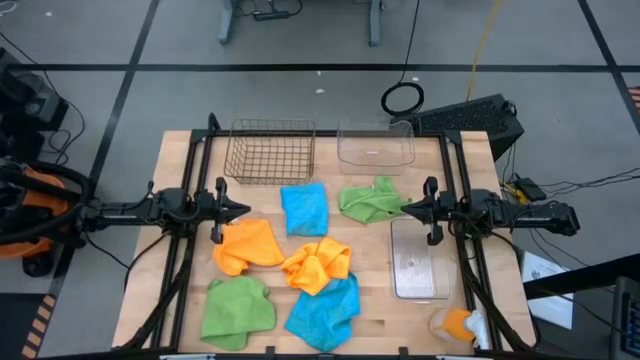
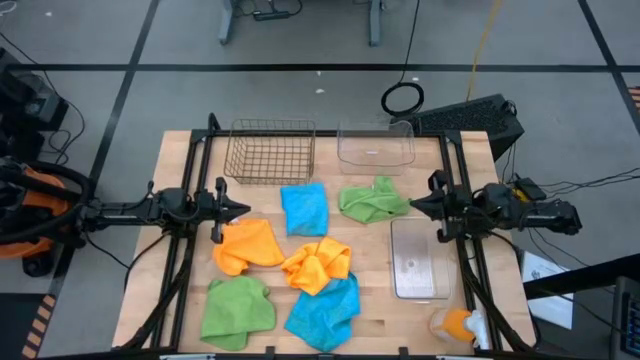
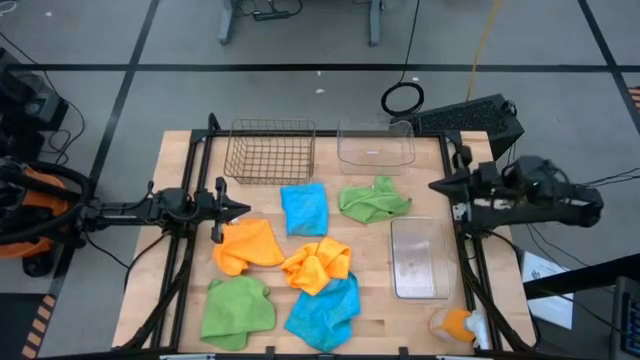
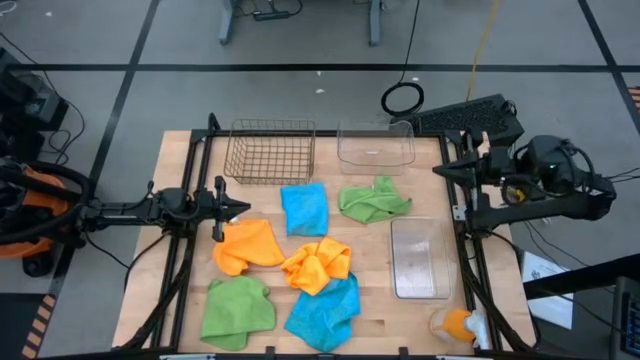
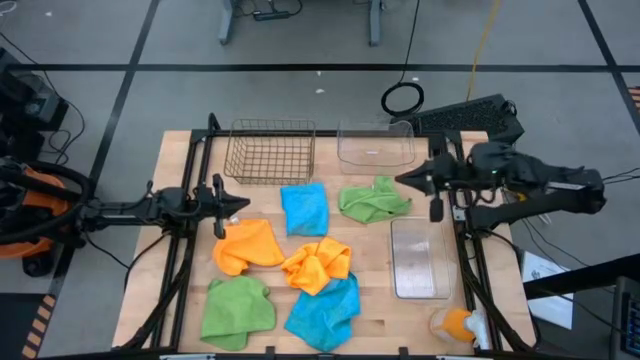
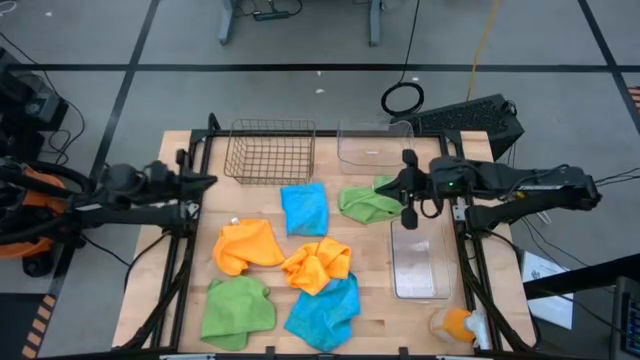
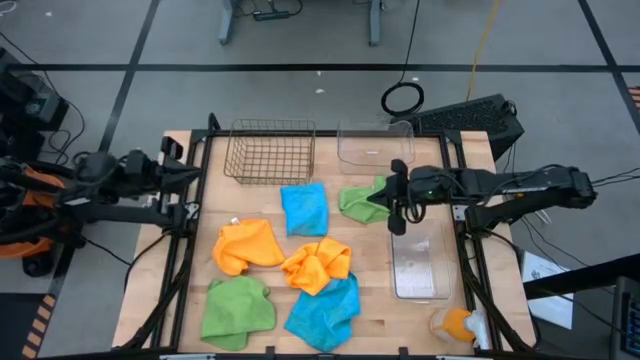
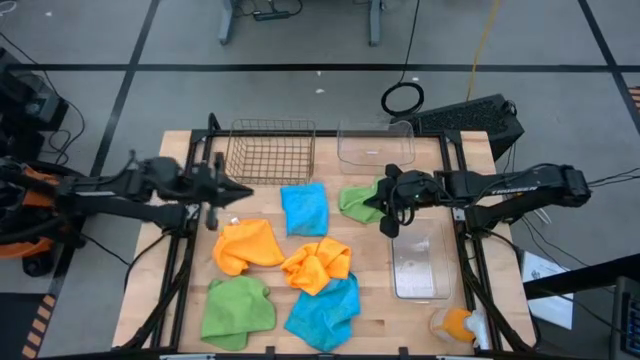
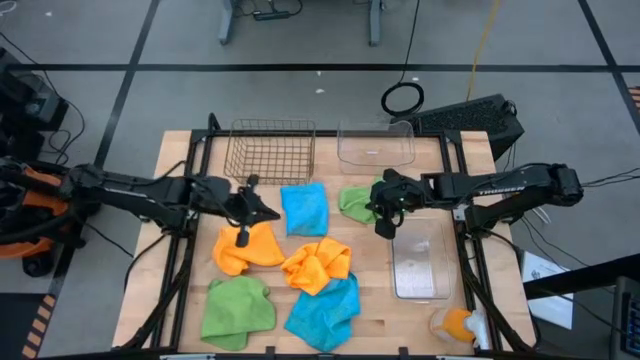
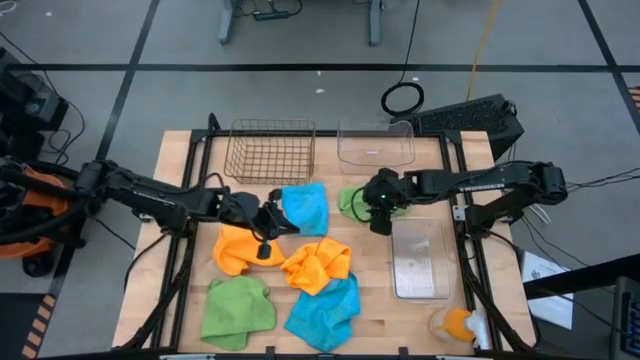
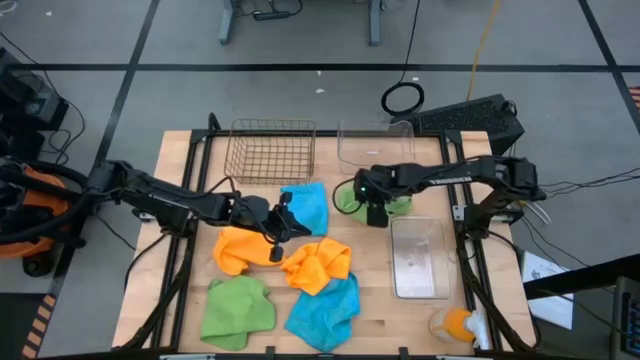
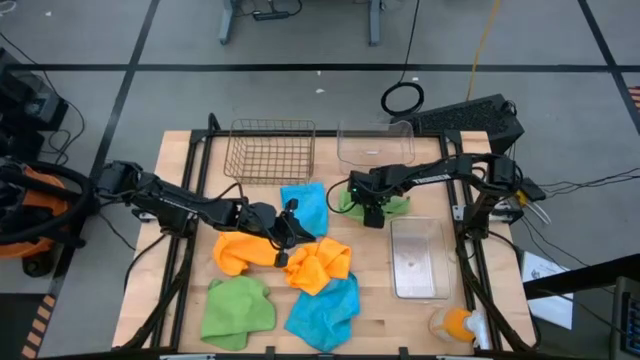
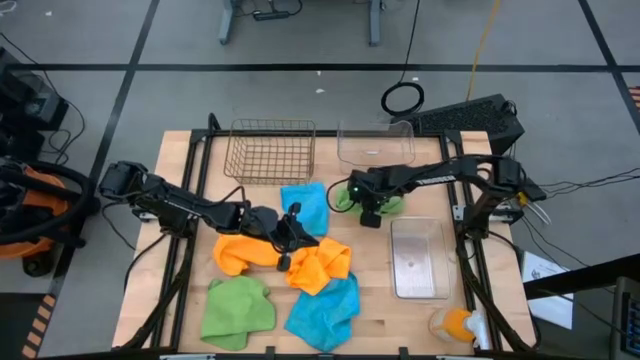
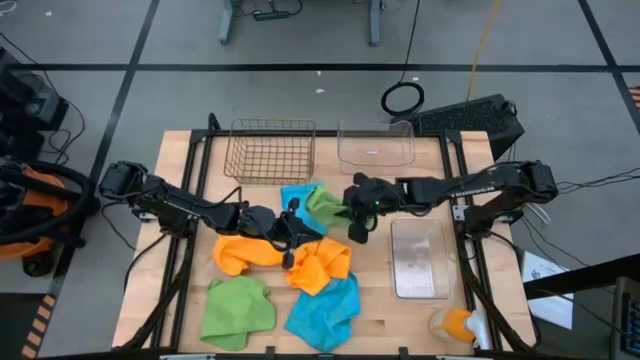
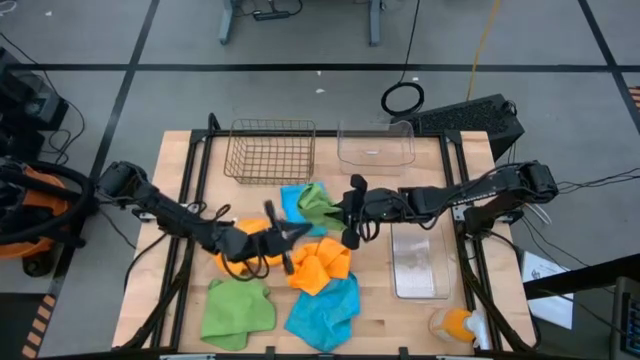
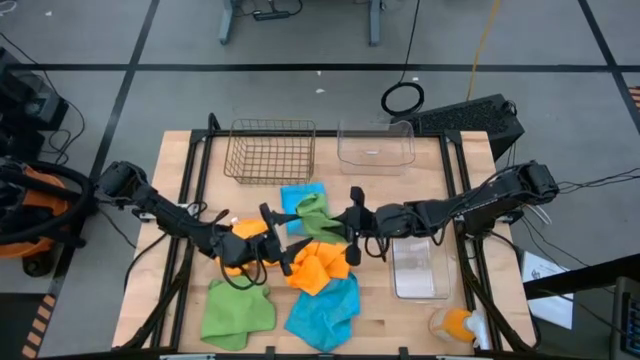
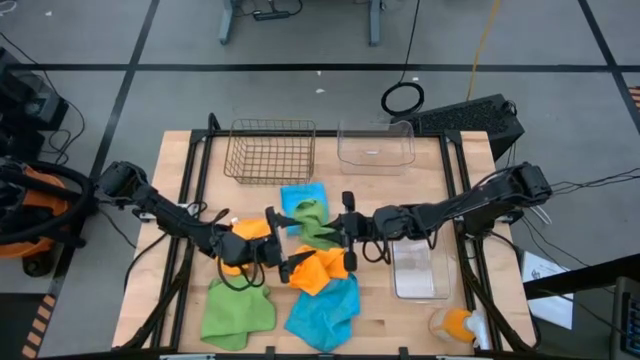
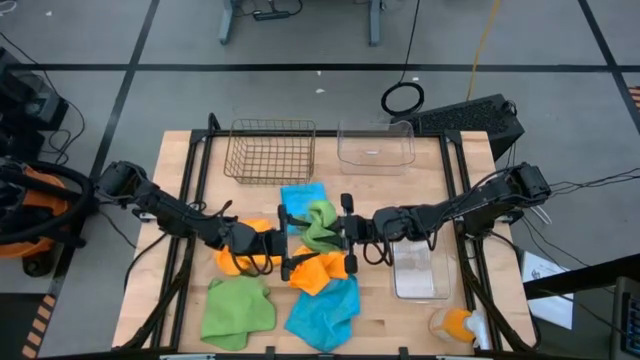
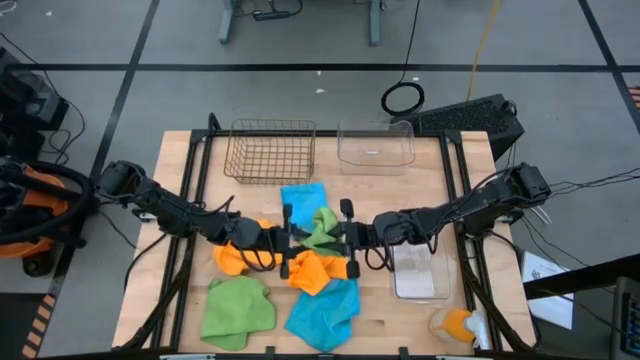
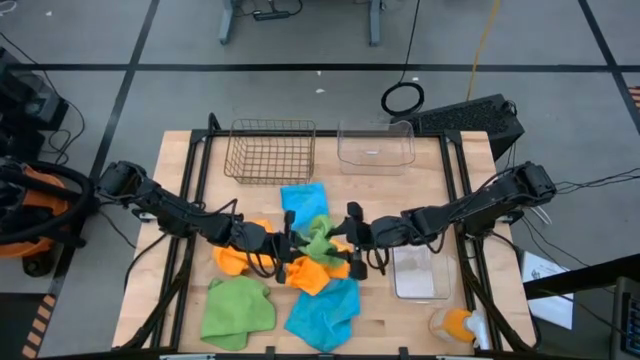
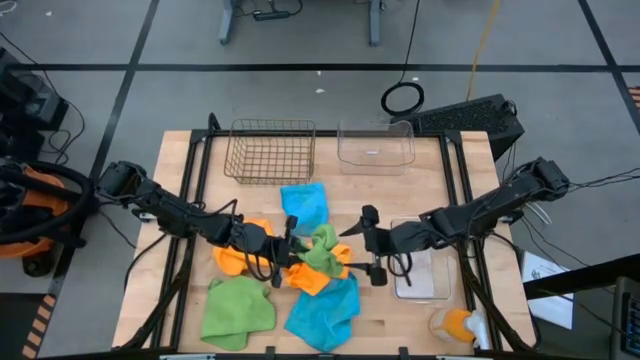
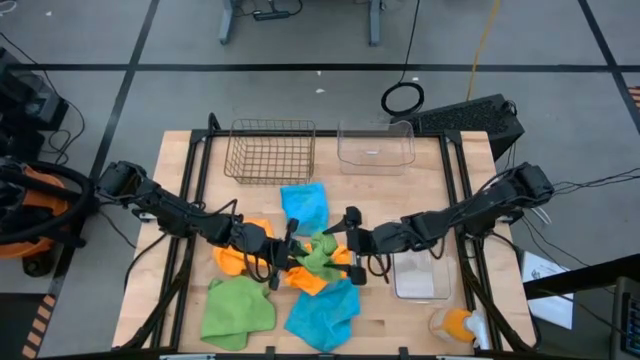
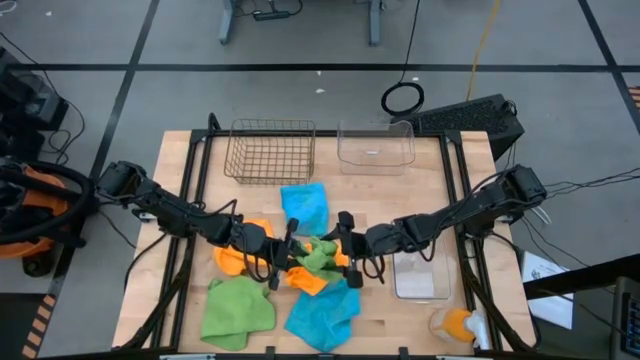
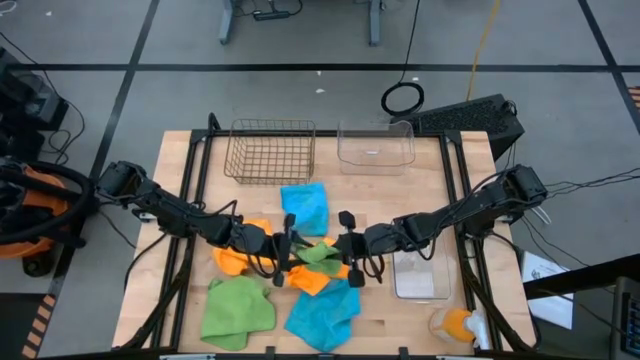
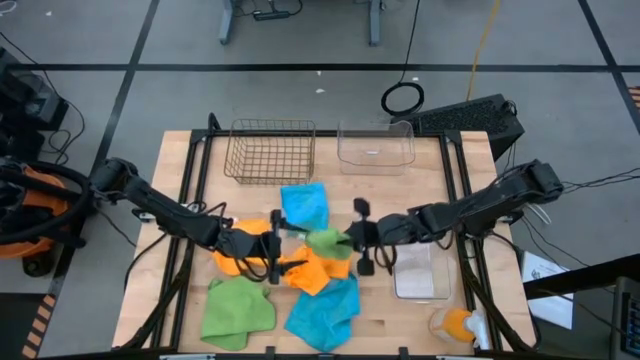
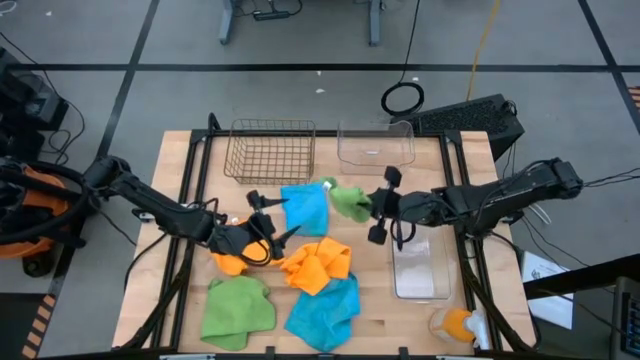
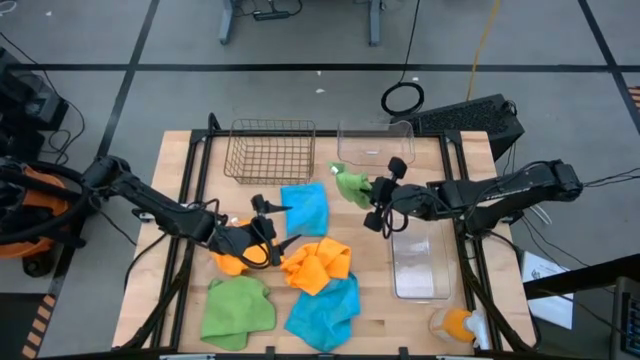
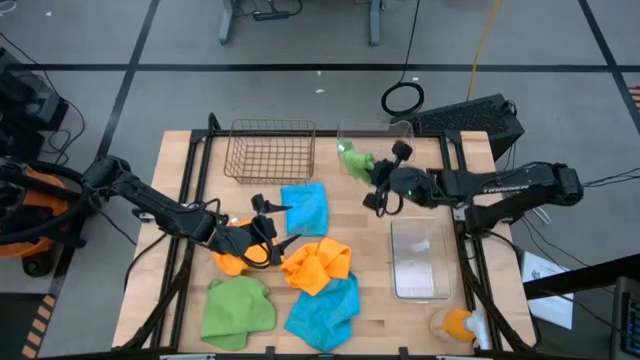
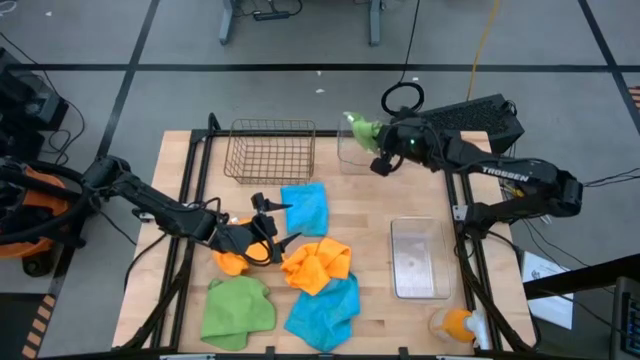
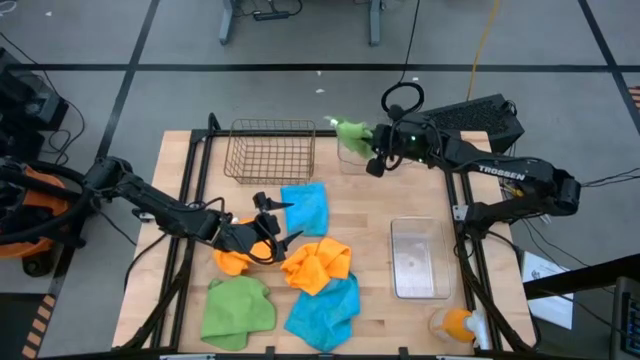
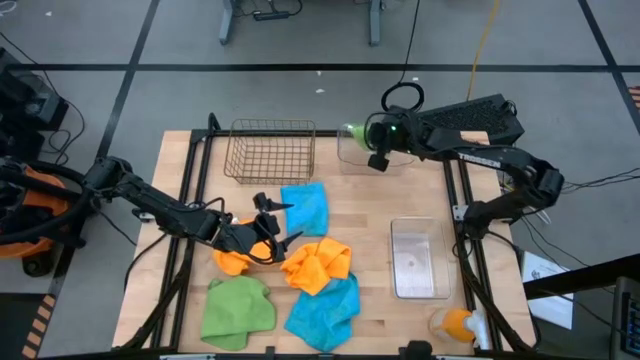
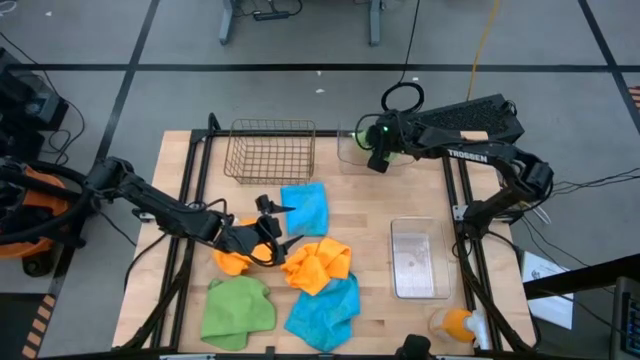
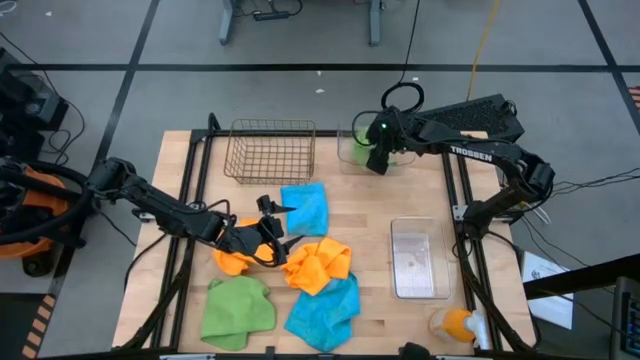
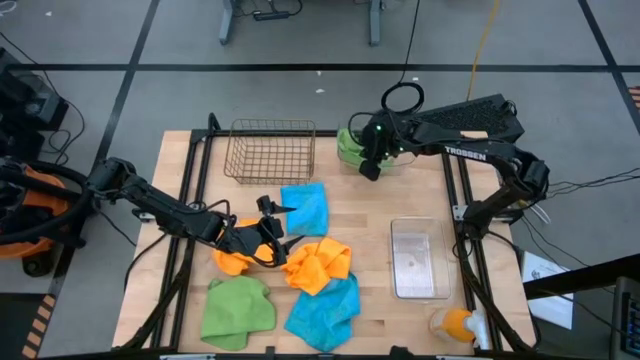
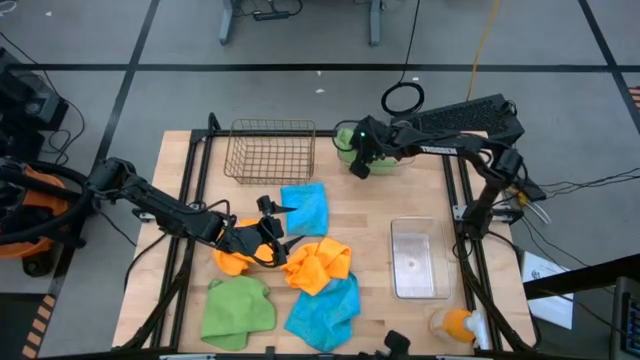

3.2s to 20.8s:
Task: Sort microfiber towel by color & place in baskets
Put the top green microfiber towel into the top transparent bin
